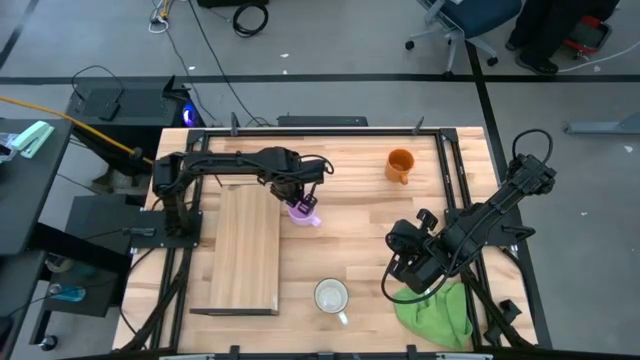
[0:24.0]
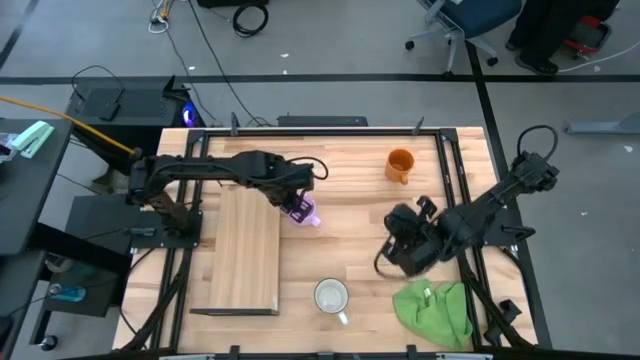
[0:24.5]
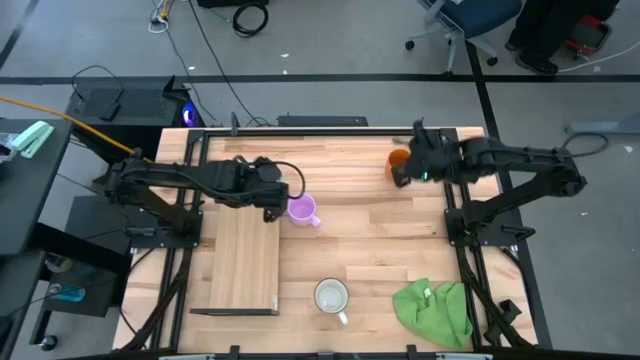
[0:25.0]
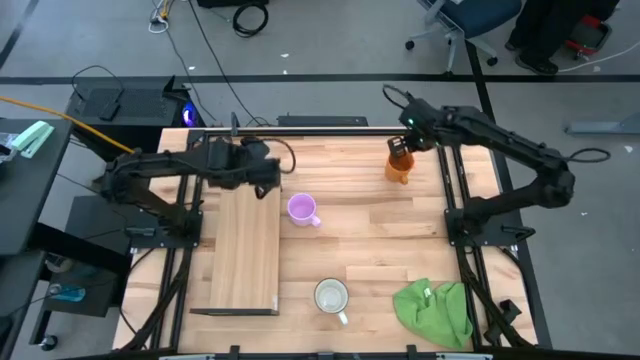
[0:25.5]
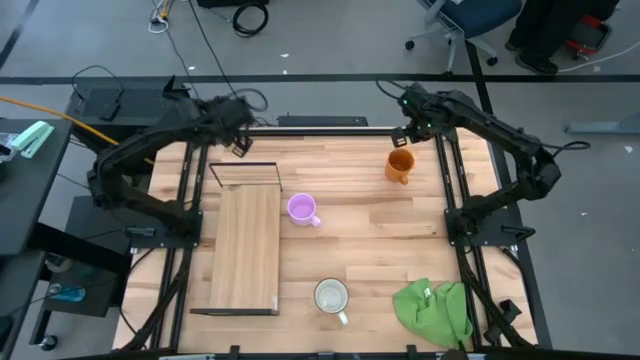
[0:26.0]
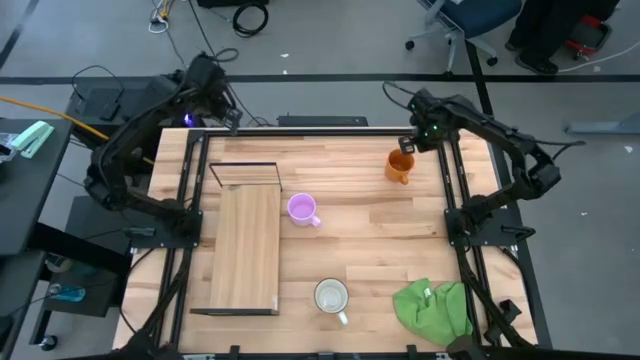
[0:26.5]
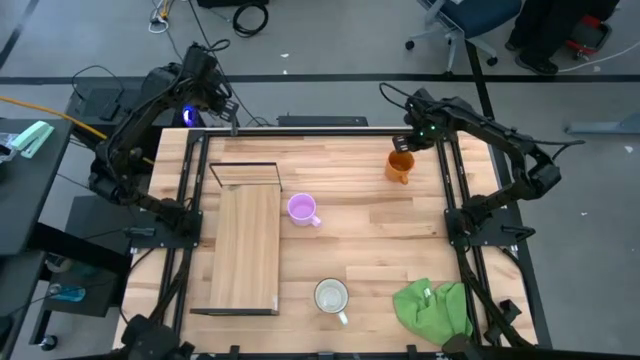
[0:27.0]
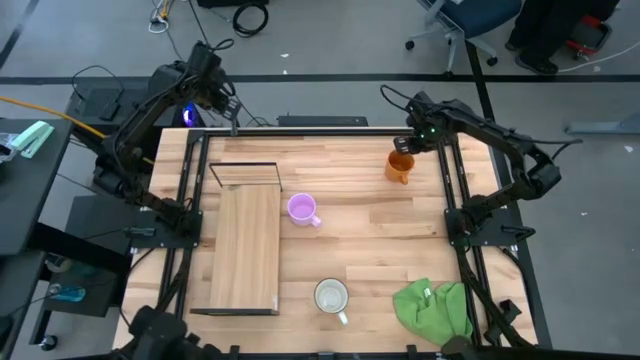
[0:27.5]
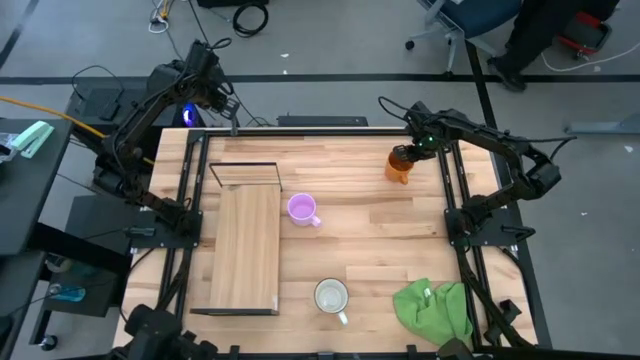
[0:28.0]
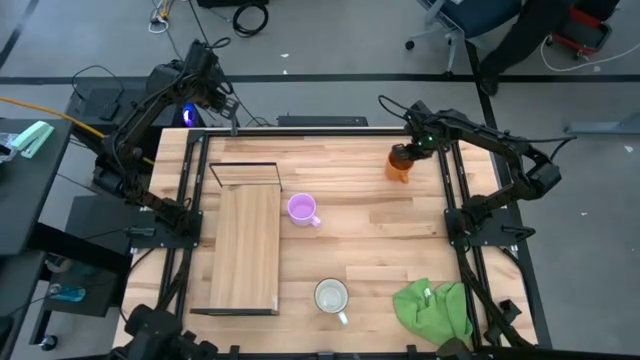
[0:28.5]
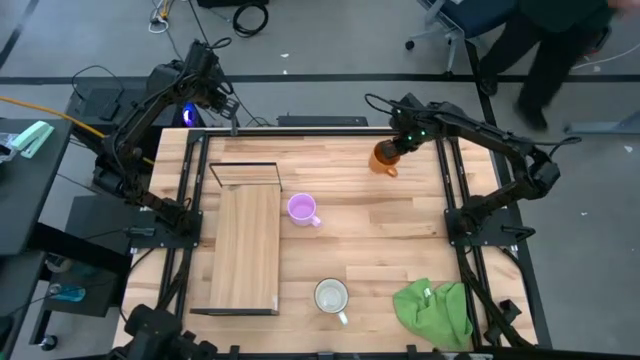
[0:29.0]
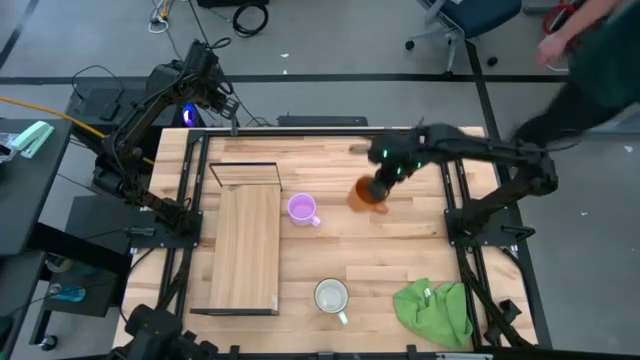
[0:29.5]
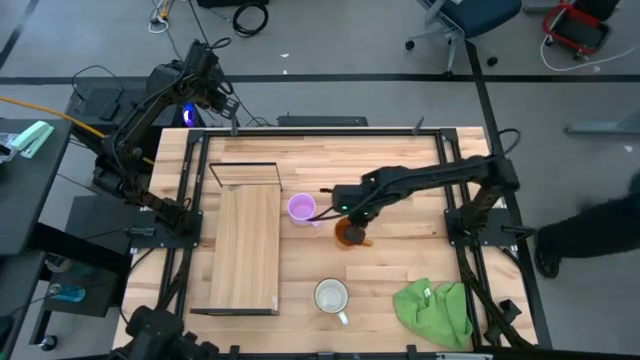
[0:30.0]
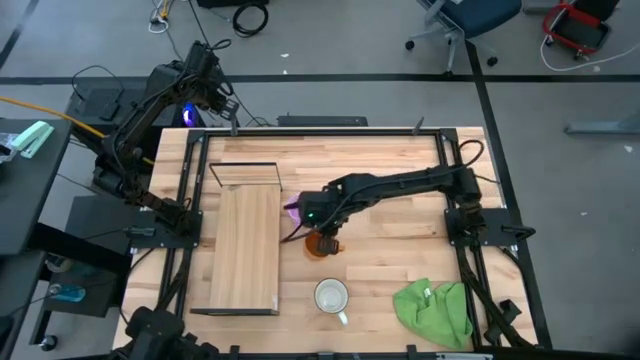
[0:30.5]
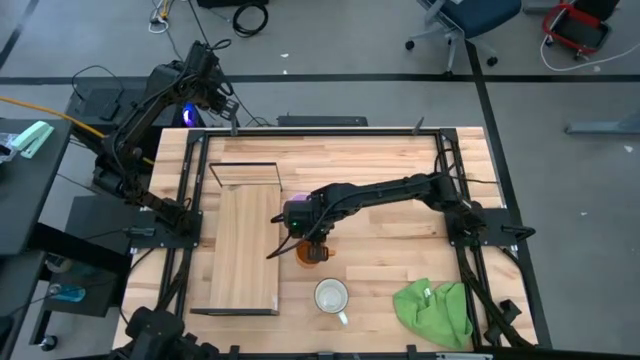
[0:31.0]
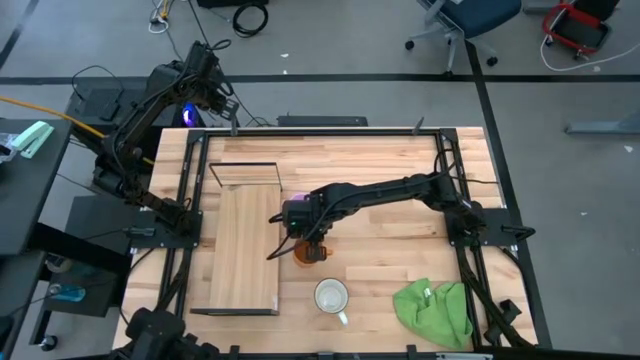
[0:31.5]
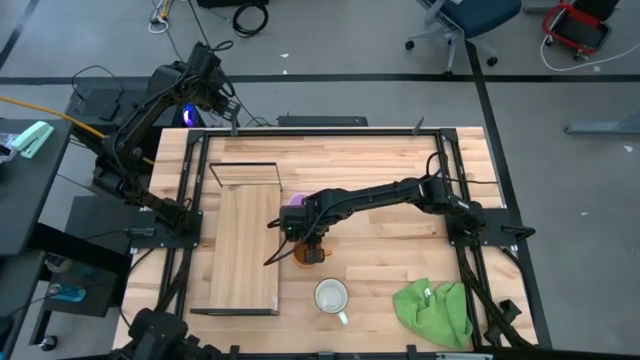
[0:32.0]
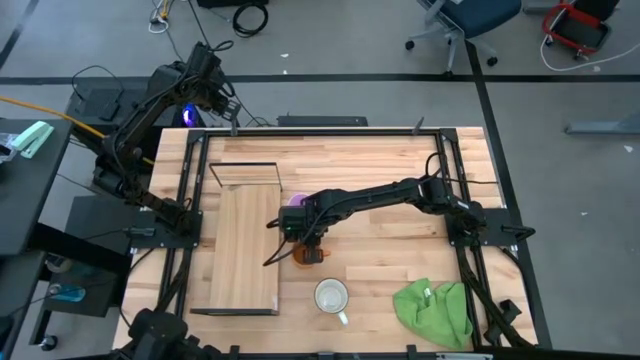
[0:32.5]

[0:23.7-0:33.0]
Task: Stack small to large cups/mugs on shelf
Move the orange mug to the right side of the shelf

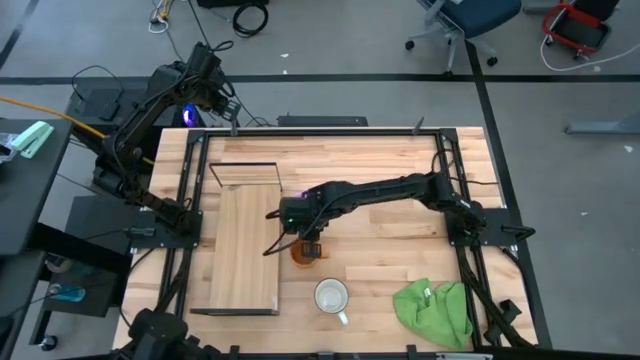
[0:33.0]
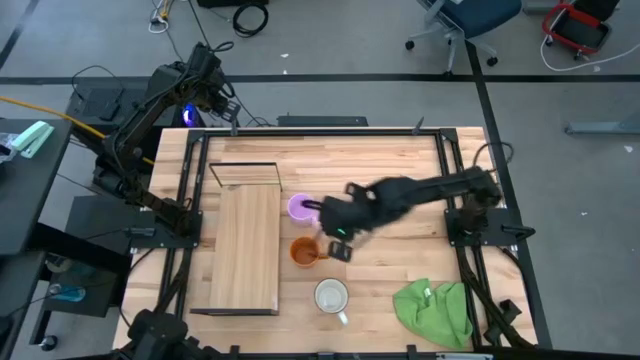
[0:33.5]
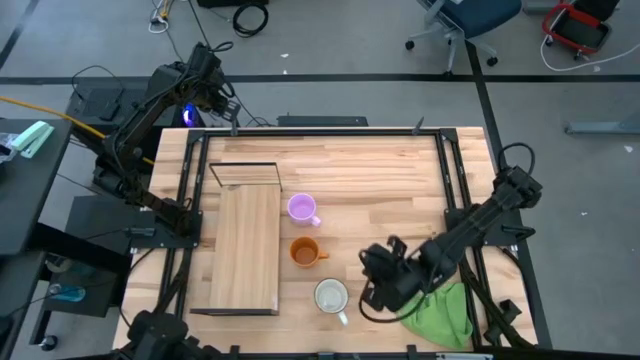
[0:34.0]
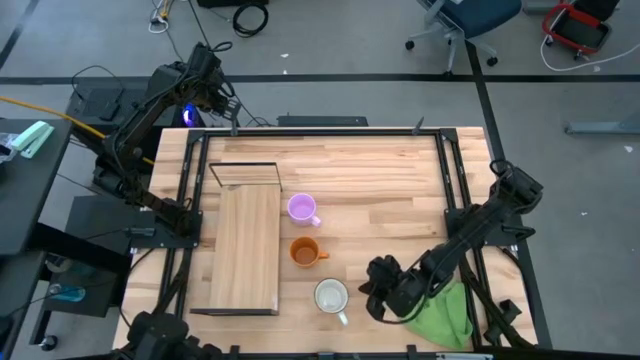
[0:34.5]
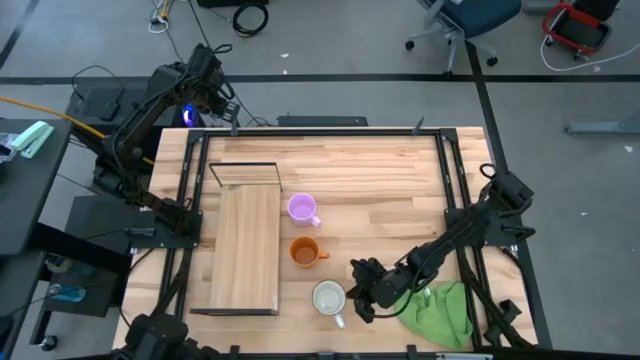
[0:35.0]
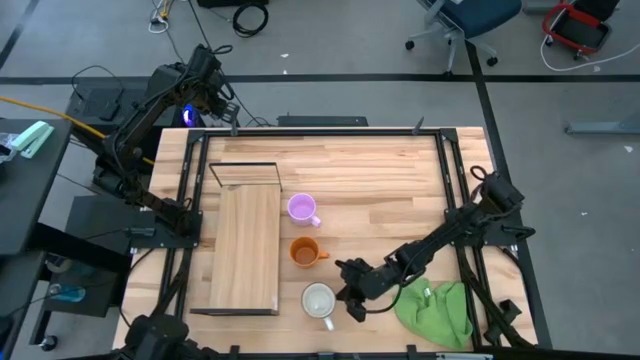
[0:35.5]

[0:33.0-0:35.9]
Move the yellow mug to the right side of the shelf

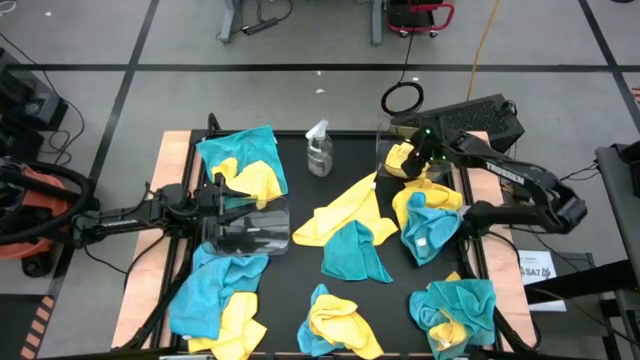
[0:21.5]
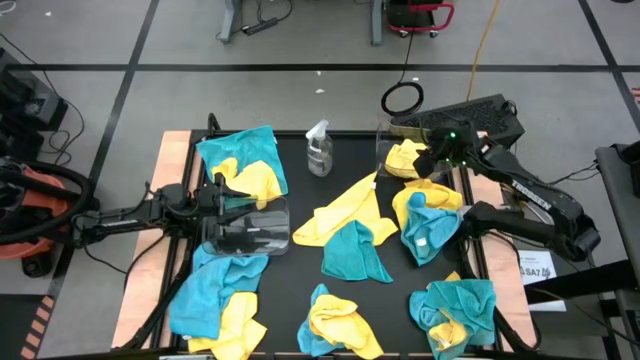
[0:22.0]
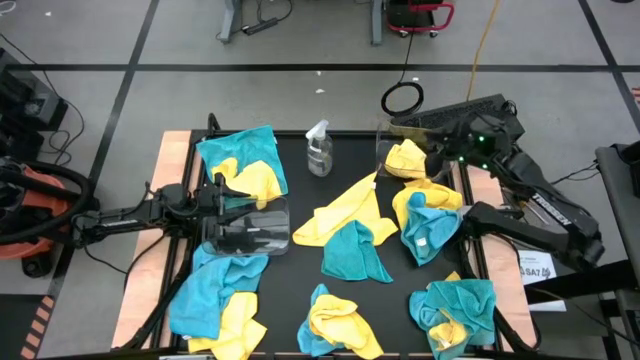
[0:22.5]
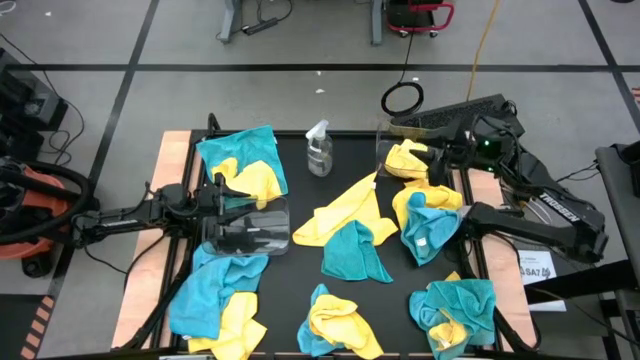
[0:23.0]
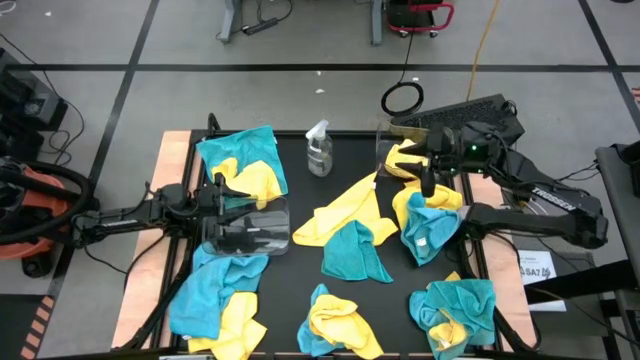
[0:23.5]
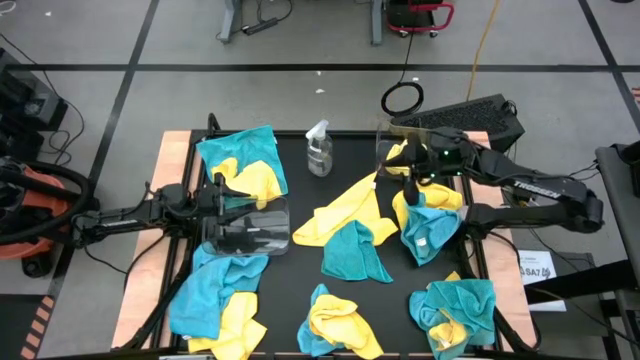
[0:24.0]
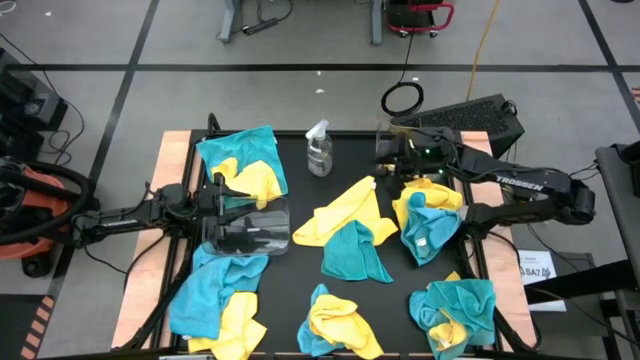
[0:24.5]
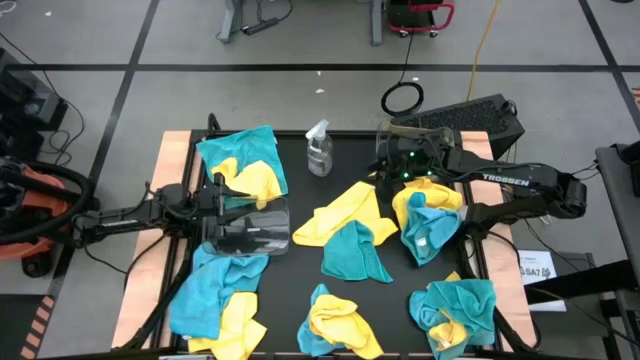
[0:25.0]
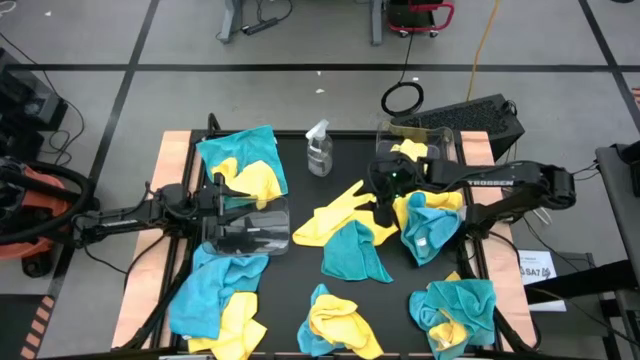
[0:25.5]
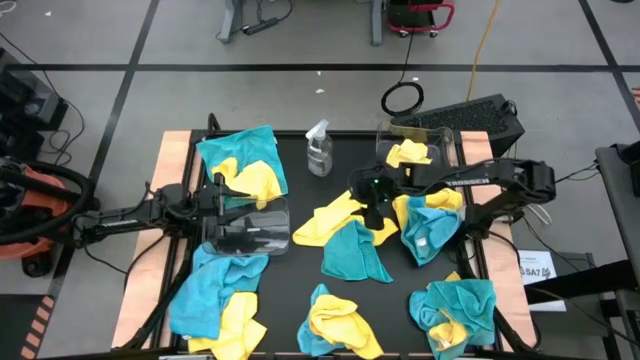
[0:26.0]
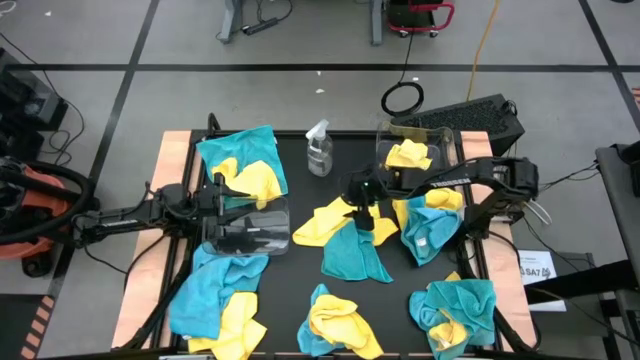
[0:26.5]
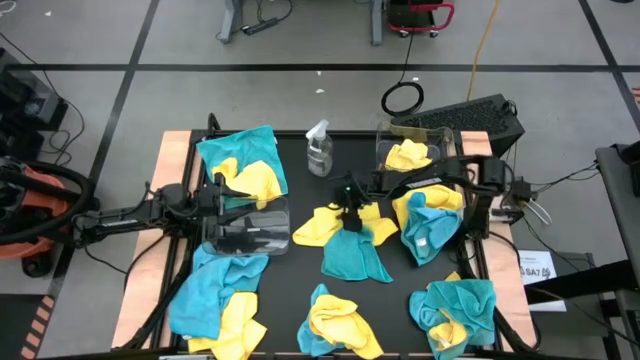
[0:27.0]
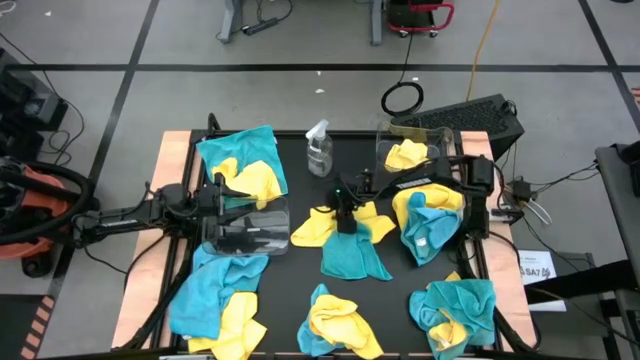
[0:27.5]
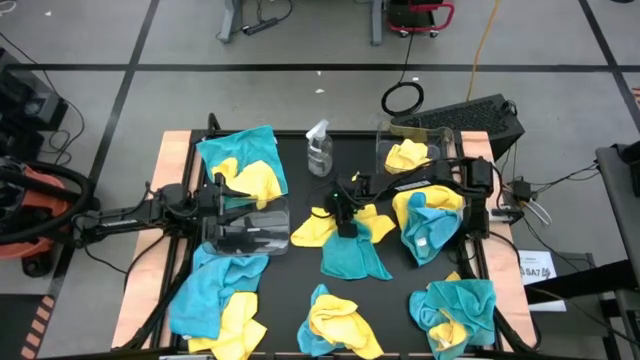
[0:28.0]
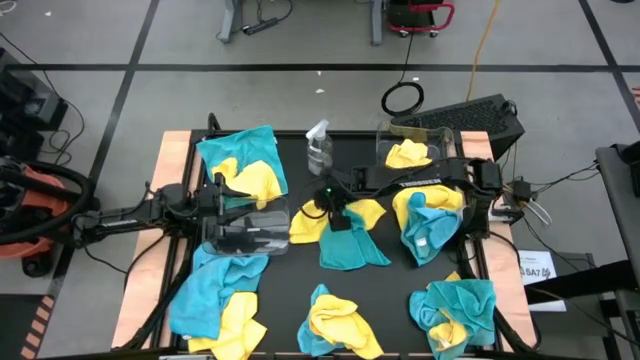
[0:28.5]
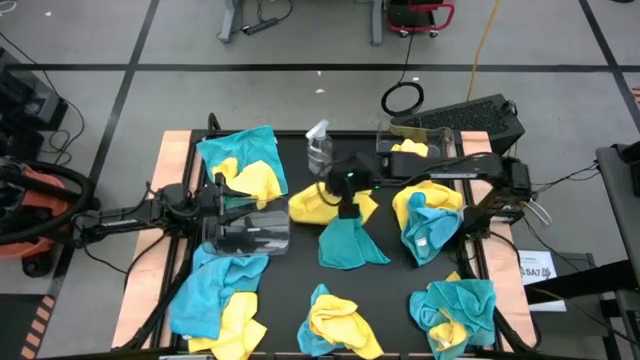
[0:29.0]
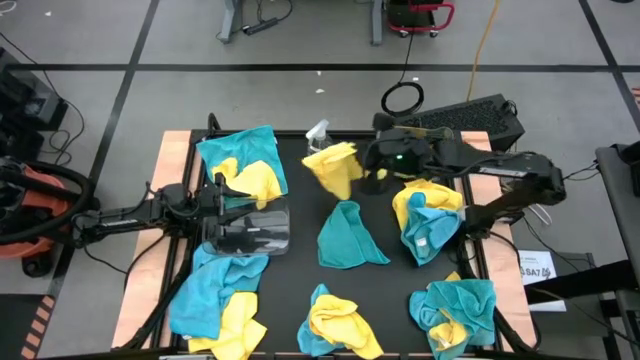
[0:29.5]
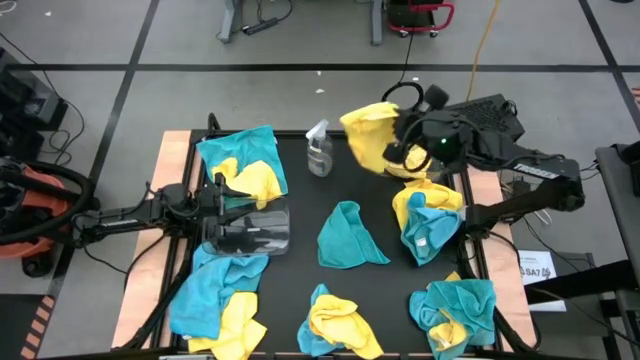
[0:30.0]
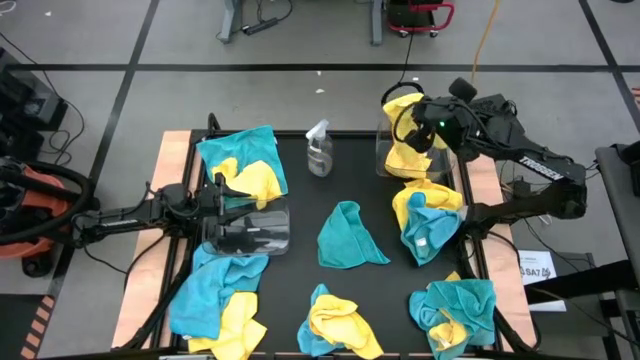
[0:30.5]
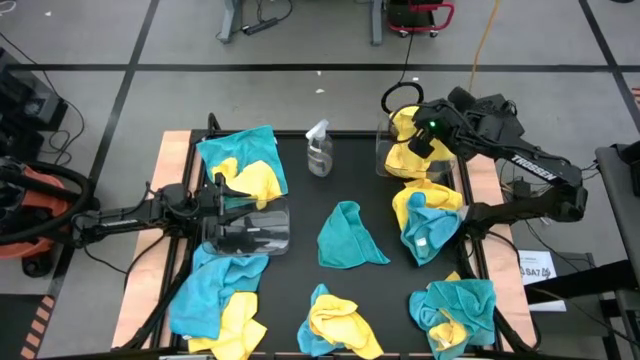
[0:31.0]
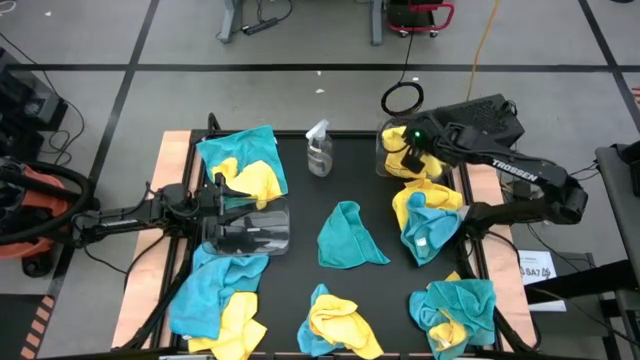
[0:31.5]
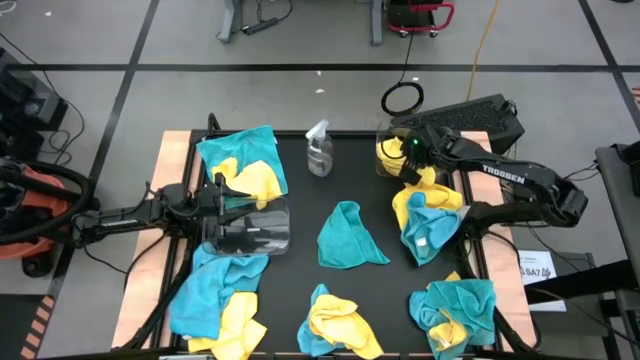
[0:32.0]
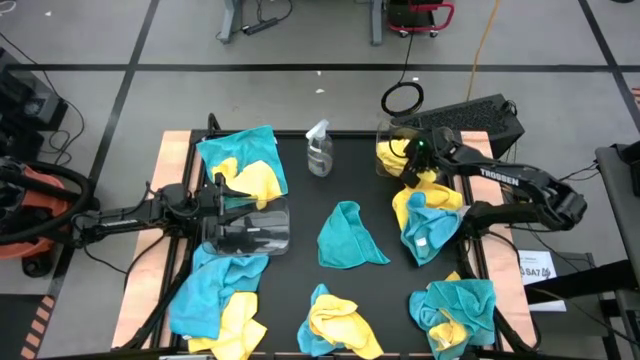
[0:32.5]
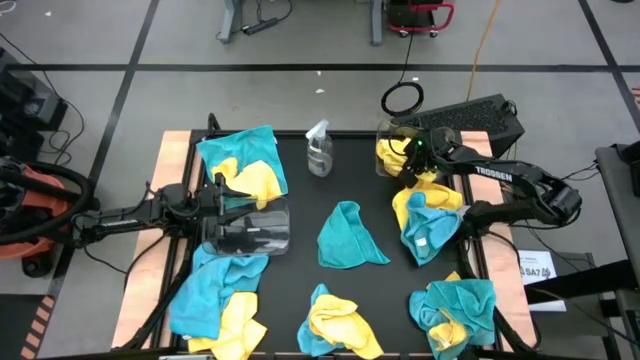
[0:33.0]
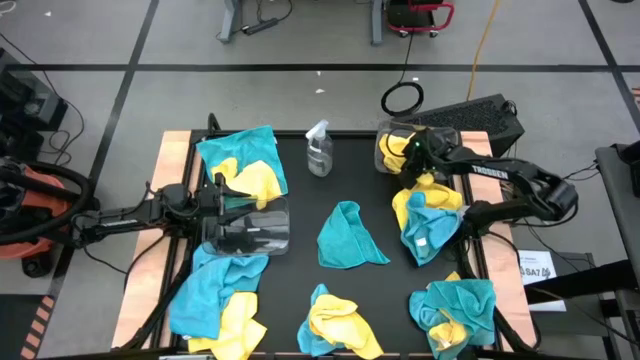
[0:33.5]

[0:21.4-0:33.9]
Task: Sort microfiber towel by color & place in baskets
Put the yellow towel into the top transparent bin
